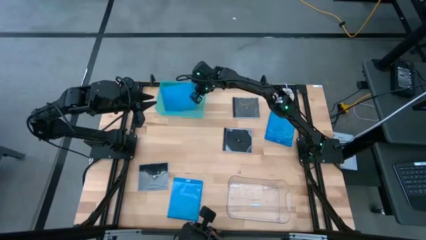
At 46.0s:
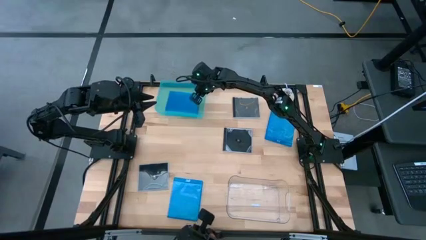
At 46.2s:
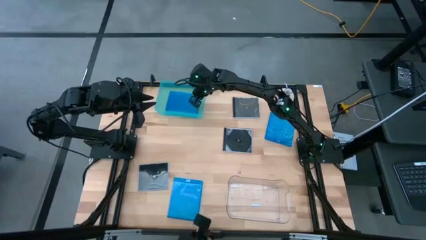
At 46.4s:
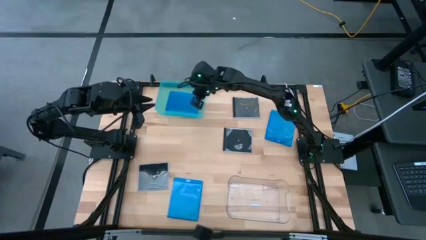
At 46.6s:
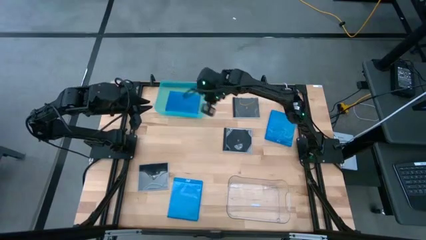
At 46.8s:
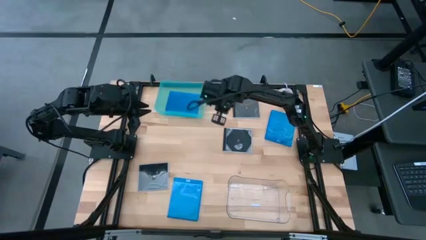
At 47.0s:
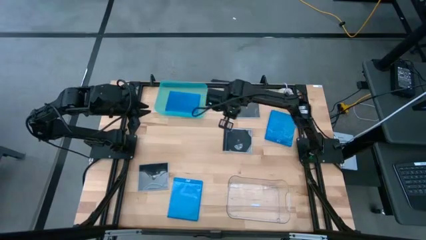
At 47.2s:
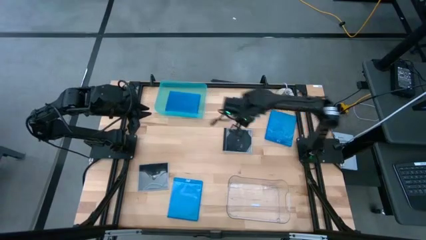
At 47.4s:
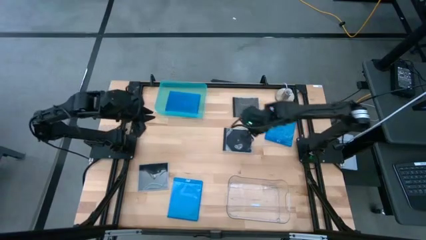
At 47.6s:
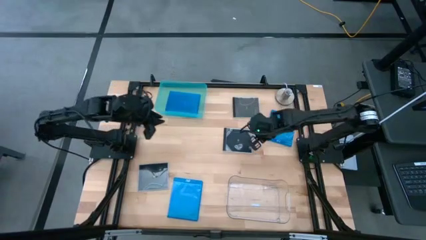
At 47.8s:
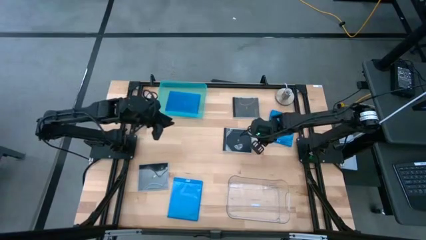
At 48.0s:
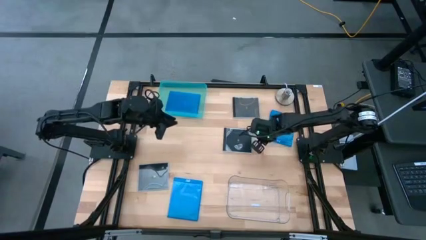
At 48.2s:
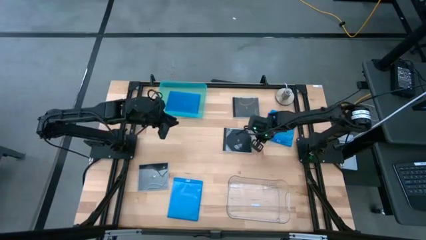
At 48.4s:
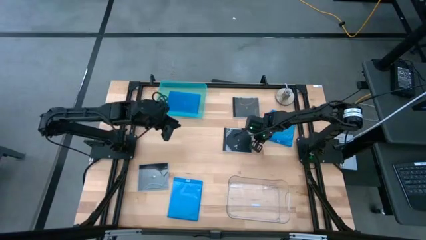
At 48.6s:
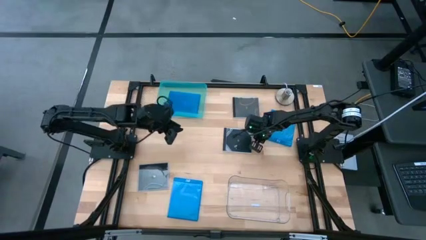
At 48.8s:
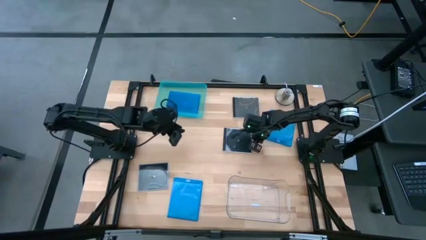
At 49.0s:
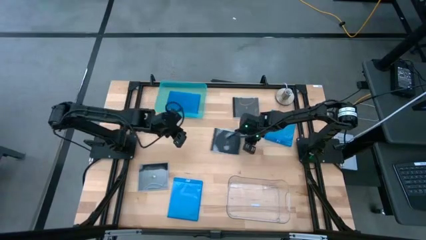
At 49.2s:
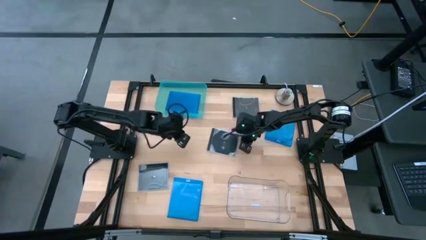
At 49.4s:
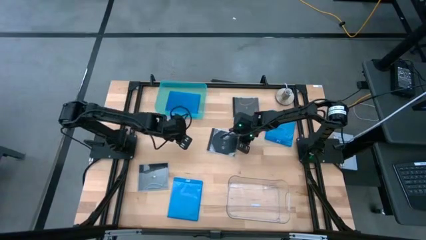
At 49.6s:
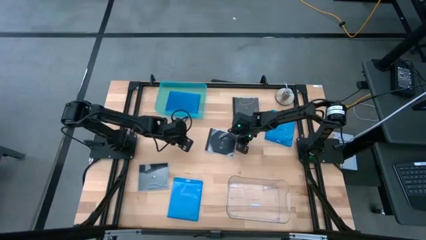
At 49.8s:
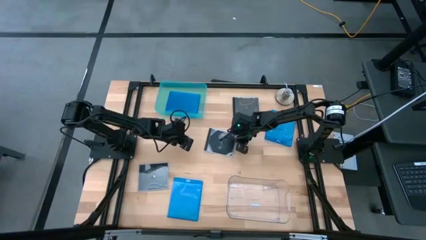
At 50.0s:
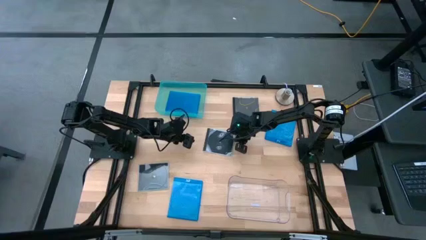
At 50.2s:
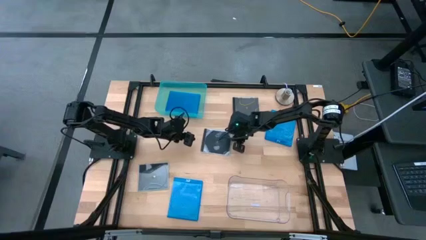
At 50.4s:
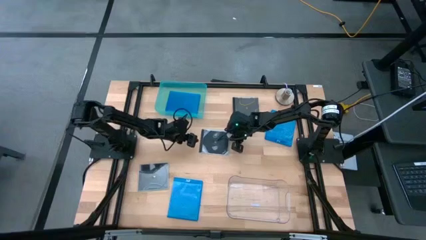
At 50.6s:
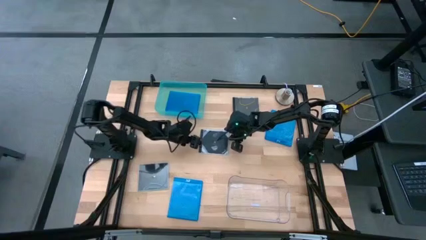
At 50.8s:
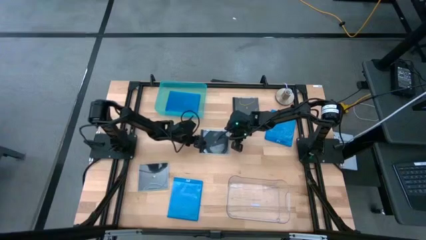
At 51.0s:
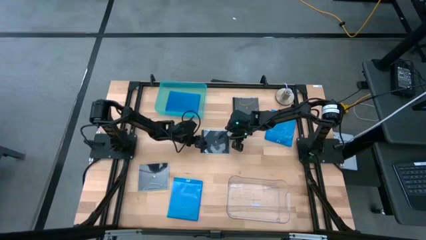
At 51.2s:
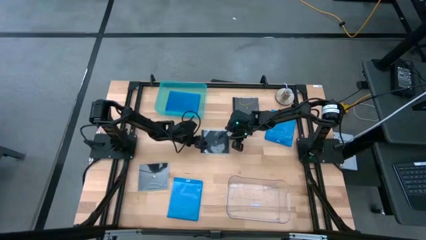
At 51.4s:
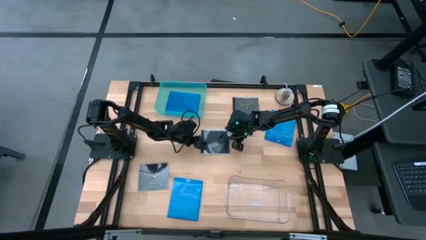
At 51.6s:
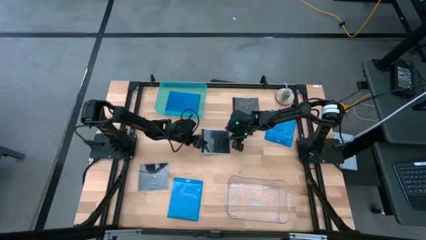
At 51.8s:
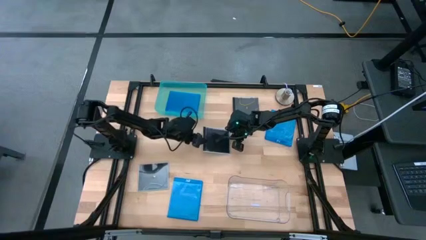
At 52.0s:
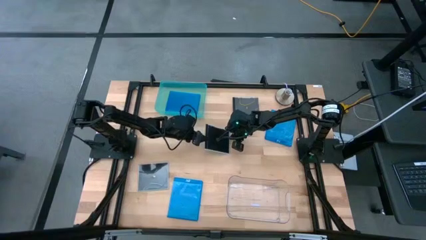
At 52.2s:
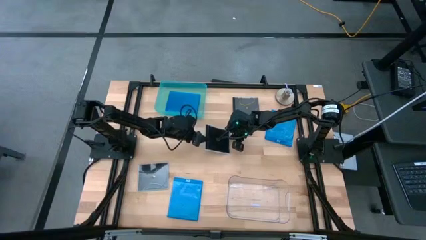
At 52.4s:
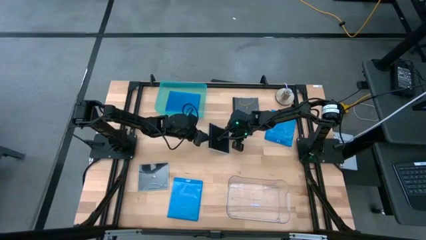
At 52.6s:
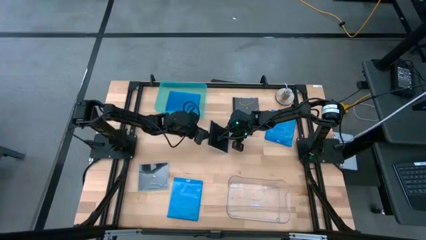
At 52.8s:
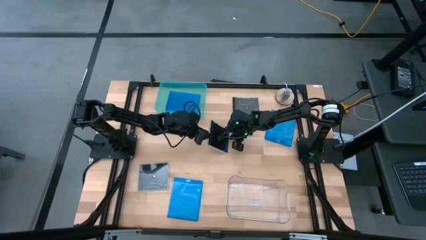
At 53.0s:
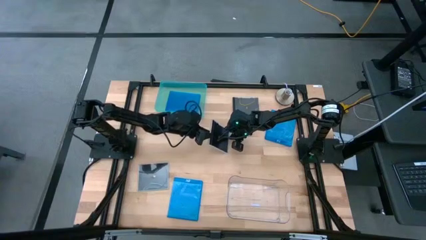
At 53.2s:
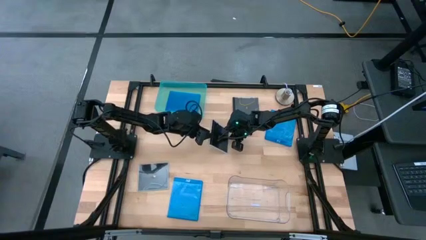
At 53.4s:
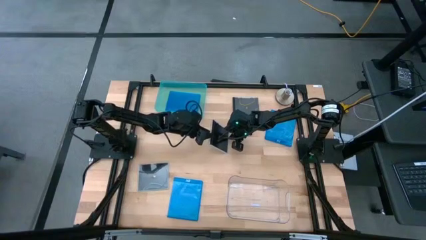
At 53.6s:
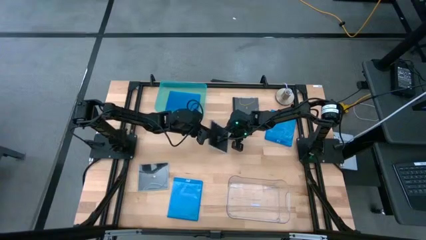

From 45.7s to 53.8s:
Task: Pick & place jewel cases by type
Put the middle black CD case into the transparent bin

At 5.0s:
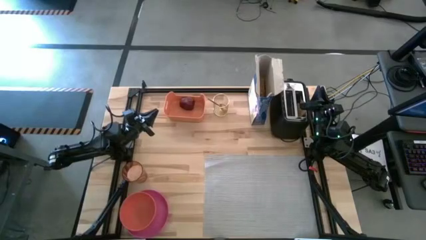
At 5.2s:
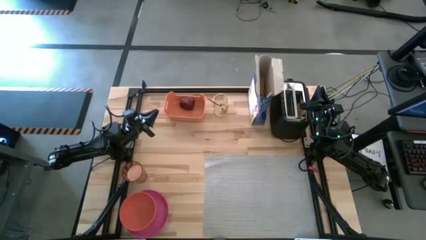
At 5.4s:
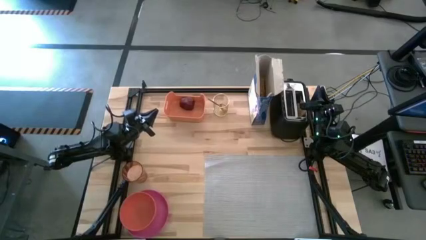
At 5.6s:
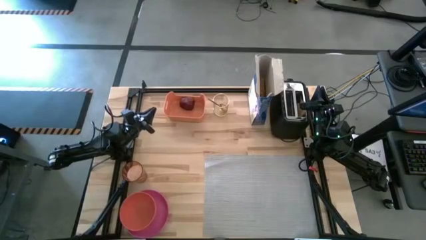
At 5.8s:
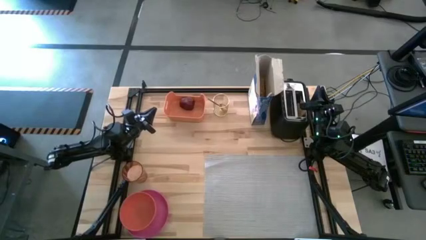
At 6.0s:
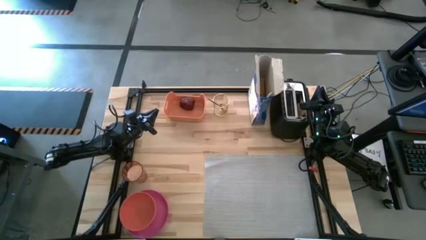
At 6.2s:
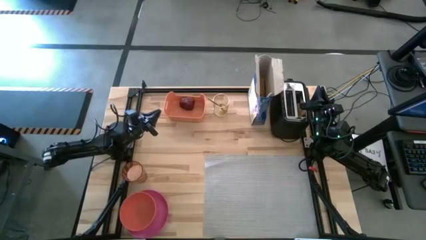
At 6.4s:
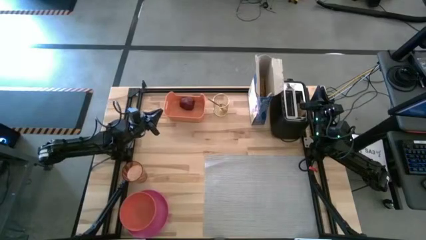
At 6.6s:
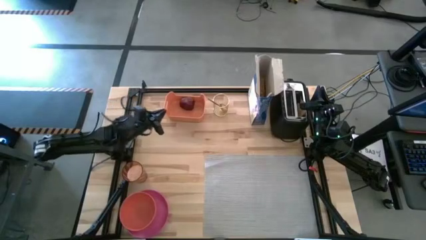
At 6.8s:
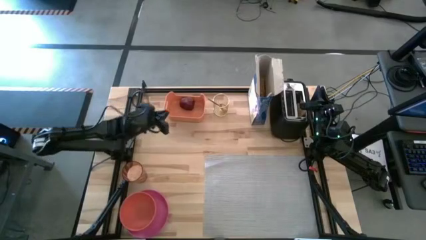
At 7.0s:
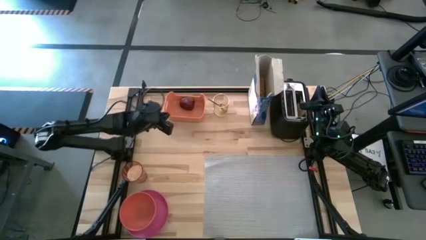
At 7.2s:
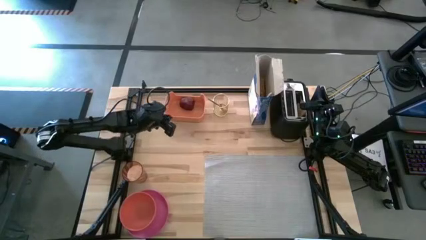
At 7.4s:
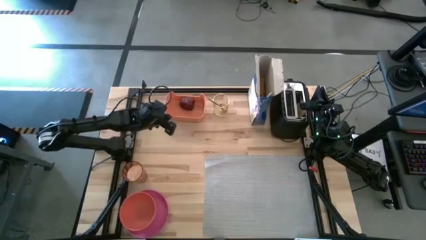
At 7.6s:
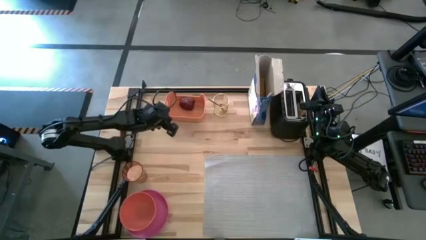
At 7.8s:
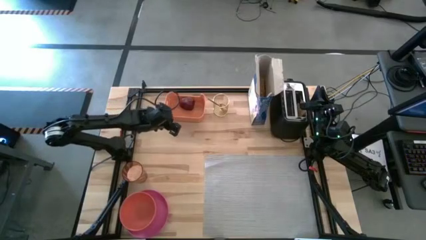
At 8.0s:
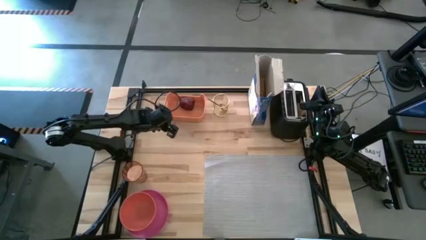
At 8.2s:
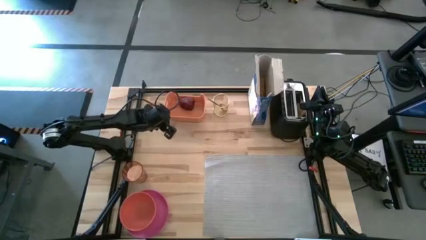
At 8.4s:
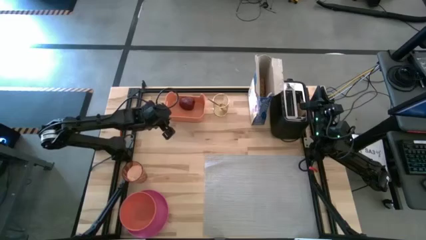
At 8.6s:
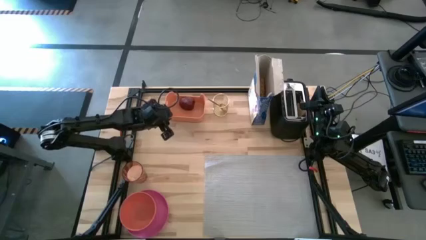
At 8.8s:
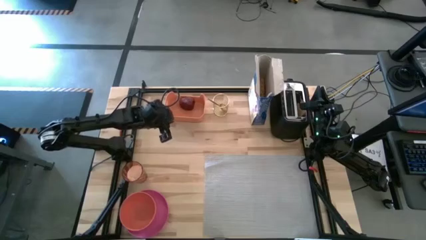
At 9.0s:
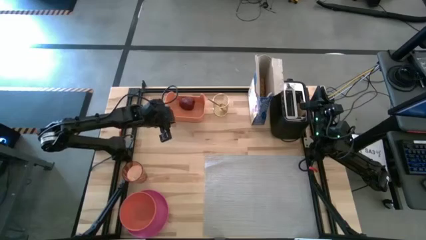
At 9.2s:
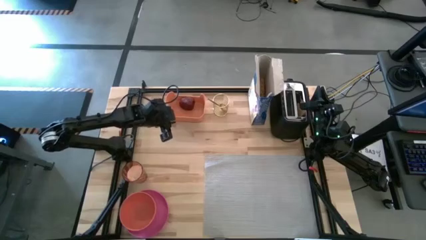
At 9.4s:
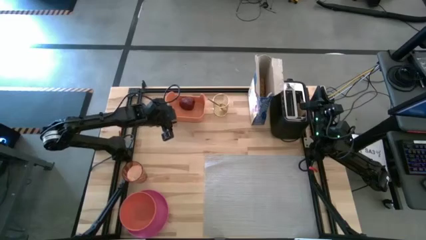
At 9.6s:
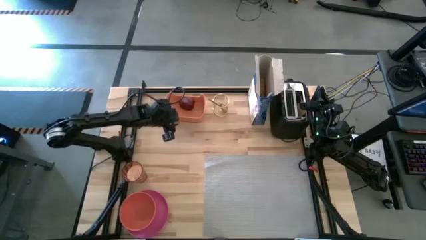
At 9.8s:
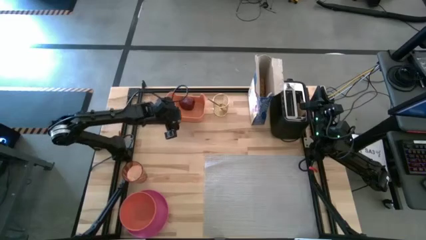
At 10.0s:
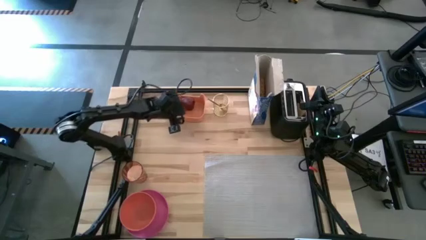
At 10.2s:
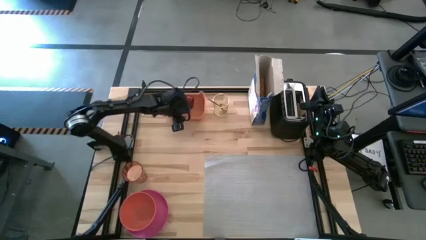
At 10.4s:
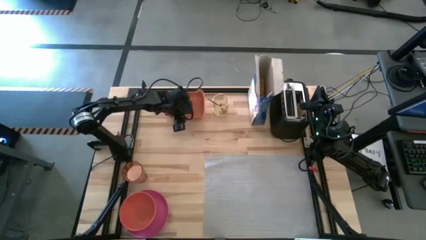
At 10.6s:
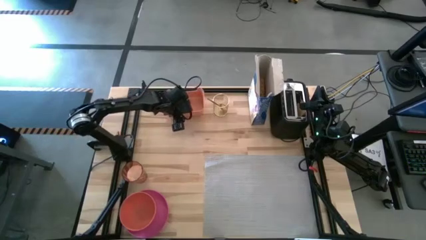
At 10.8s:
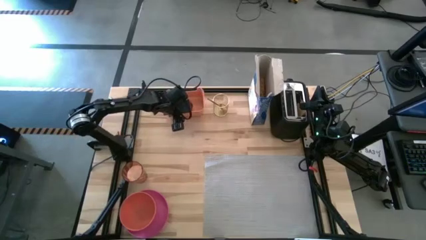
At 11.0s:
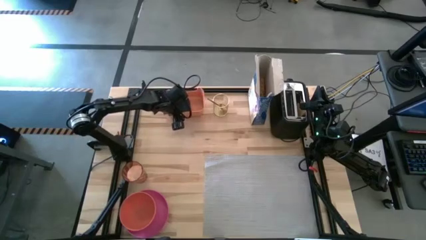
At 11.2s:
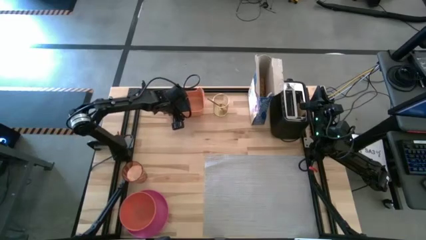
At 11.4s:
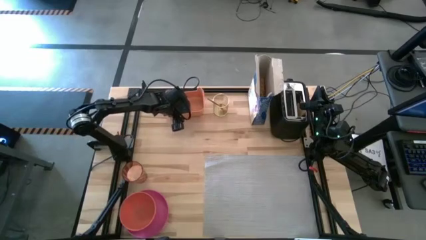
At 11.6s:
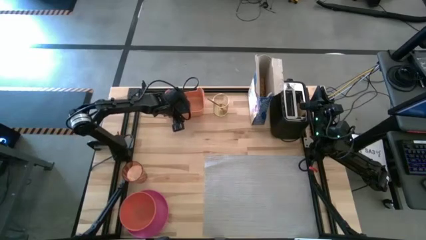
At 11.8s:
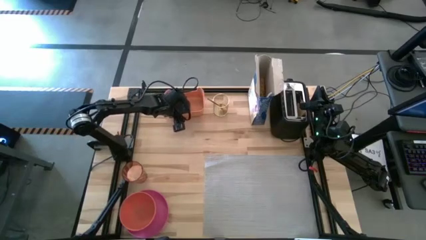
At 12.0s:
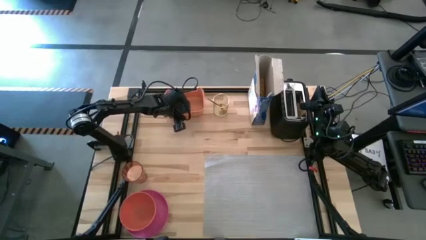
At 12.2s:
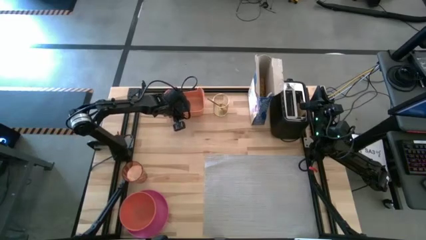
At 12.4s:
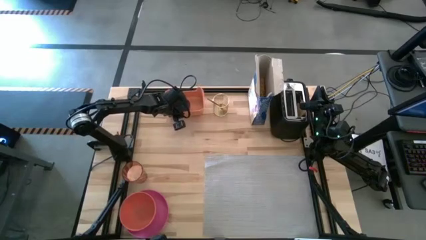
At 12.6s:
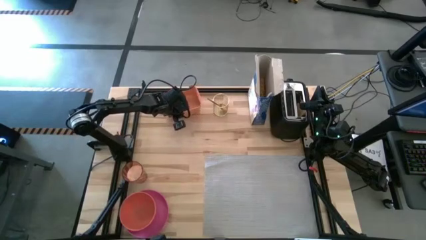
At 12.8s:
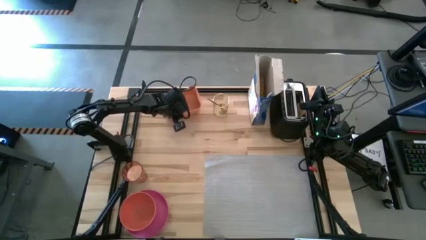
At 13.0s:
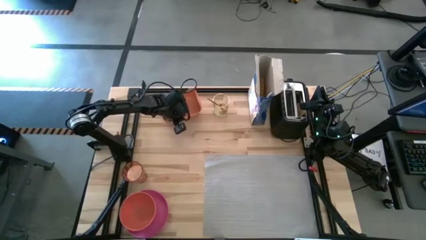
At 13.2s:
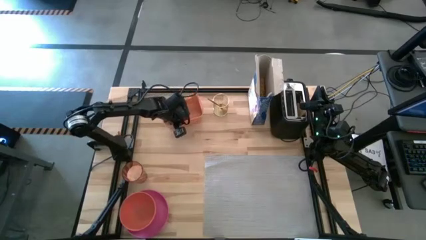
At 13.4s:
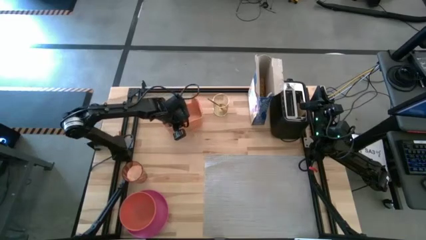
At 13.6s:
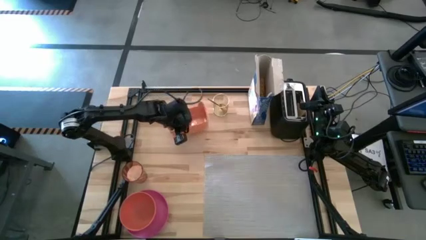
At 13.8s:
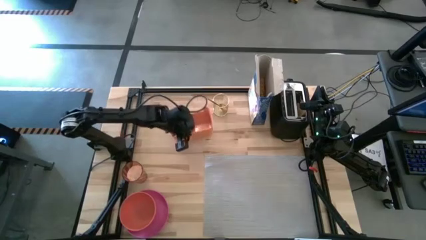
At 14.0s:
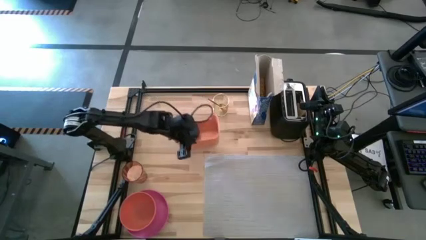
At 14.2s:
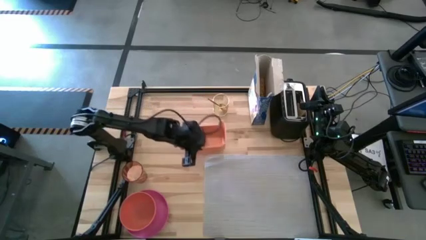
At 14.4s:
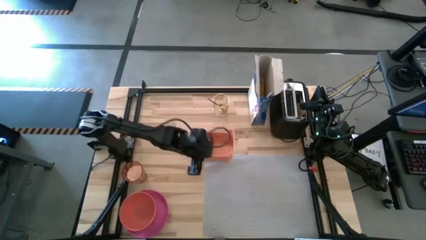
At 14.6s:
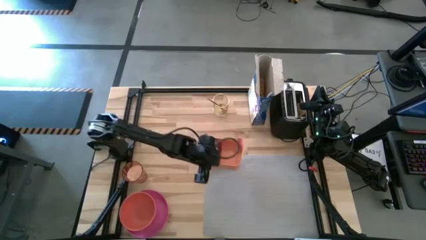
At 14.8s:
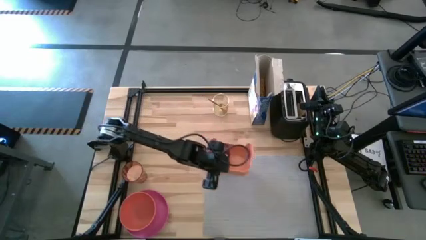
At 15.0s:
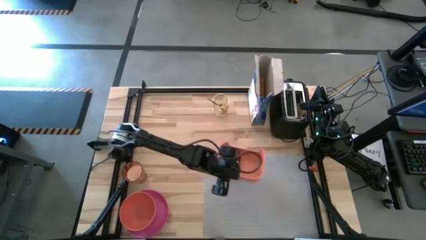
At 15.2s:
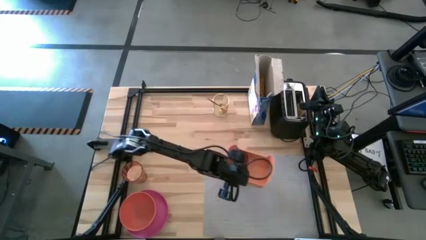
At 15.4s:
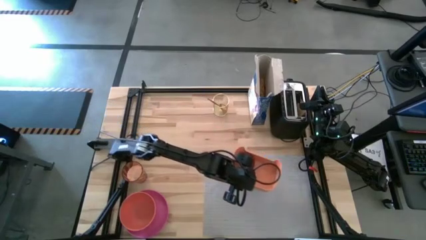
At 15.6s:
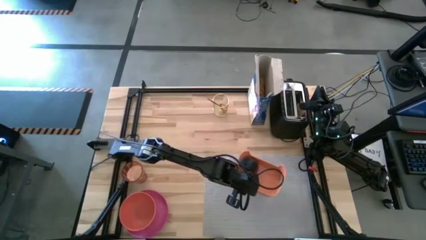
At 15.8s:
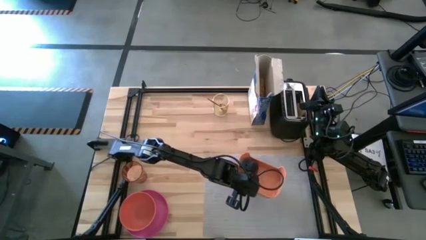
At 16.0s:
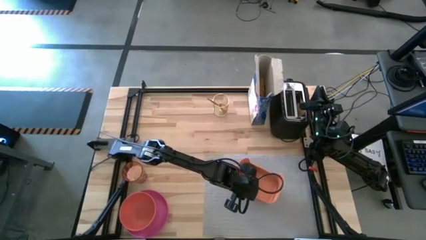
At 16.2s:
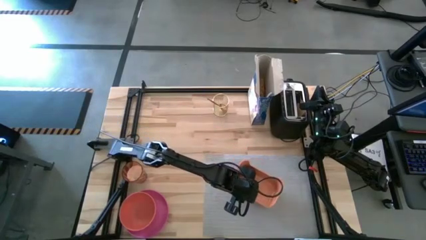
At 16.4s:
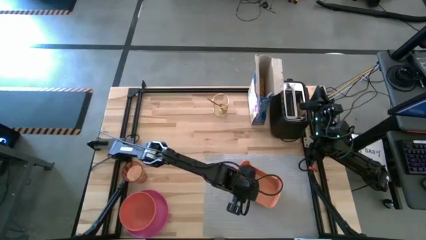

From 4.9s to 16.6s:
Task: Arrange a breakfast setting
Put the orange bin on the gray table mat
